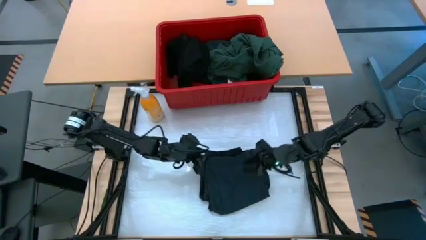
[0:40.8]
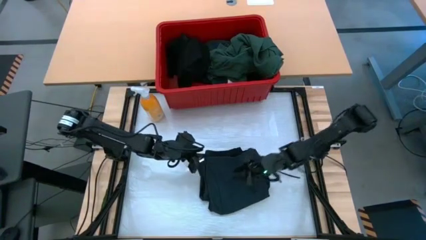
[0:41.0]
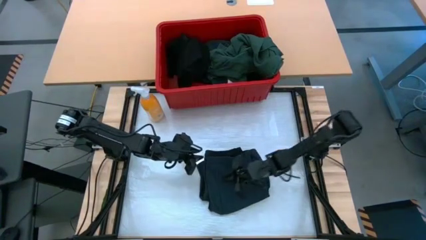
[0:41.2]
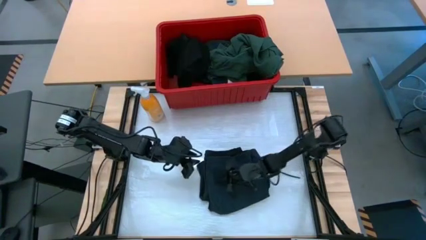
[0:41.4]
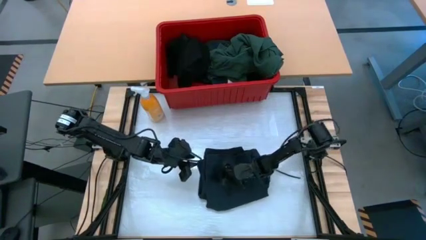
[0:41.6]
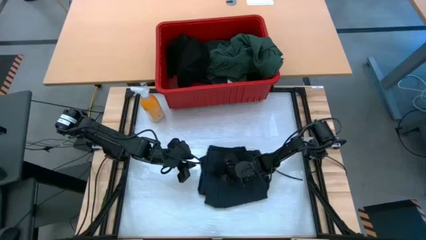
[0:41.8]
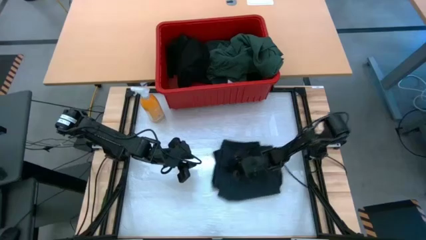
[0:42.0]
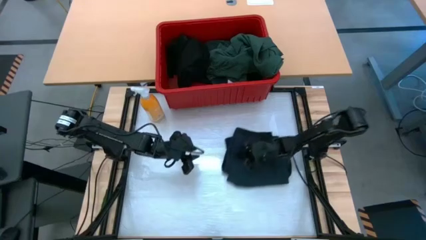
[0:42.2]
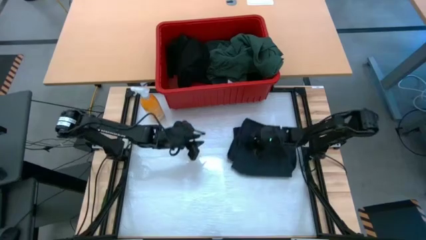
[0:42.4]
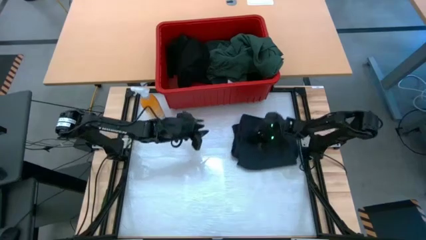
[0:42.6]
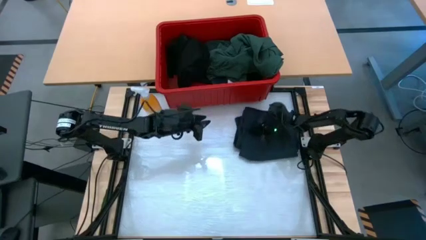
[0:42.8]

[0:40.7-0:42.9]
Task: Fold Laundry from Bin
Move the black shorts to the top right of the table

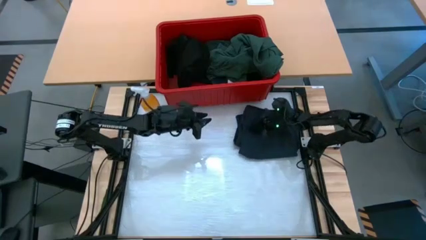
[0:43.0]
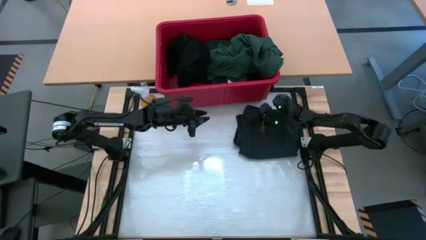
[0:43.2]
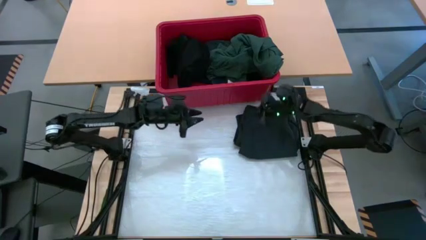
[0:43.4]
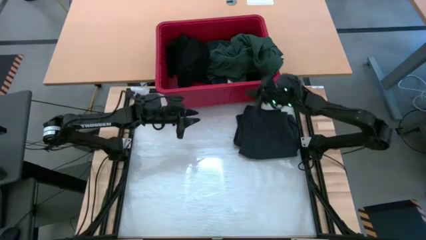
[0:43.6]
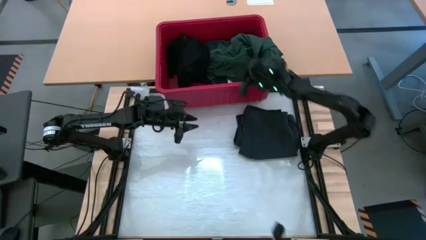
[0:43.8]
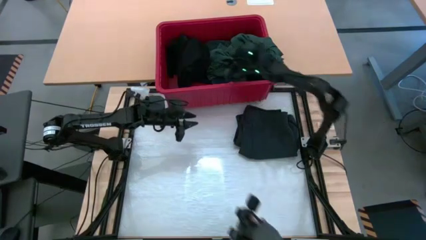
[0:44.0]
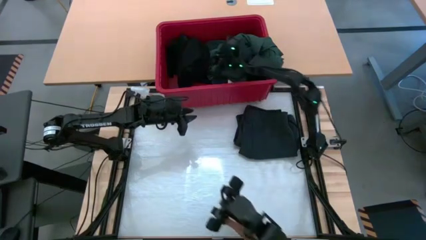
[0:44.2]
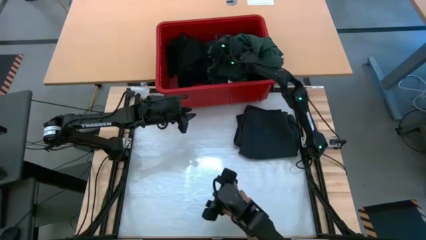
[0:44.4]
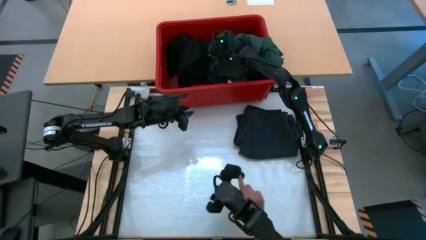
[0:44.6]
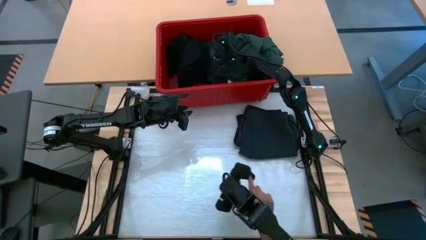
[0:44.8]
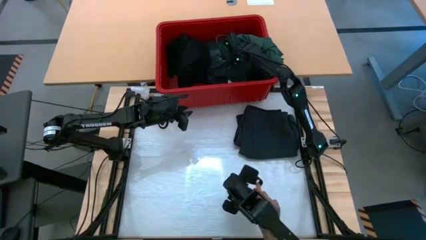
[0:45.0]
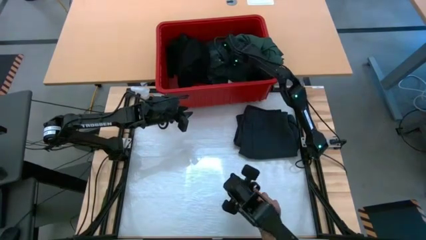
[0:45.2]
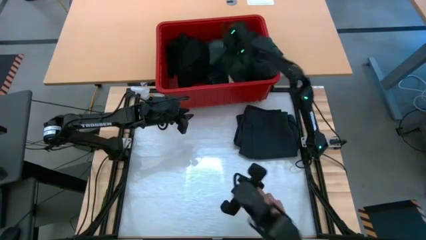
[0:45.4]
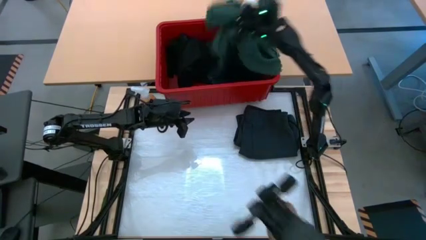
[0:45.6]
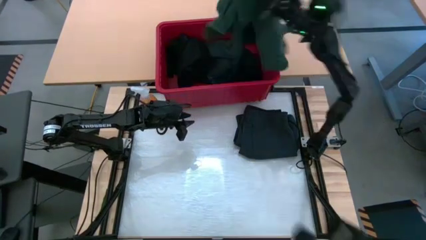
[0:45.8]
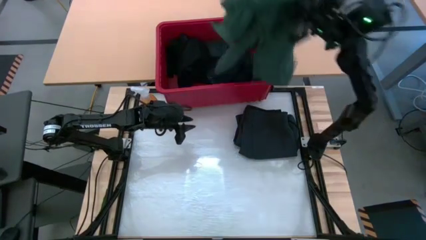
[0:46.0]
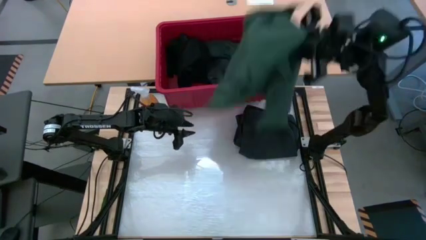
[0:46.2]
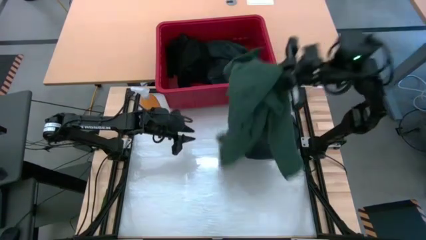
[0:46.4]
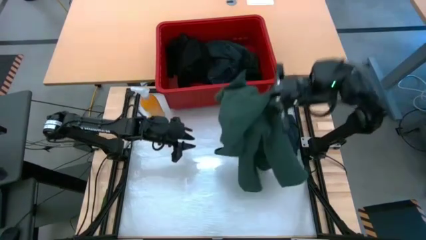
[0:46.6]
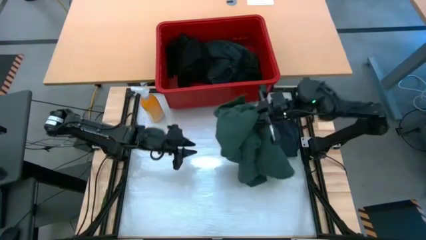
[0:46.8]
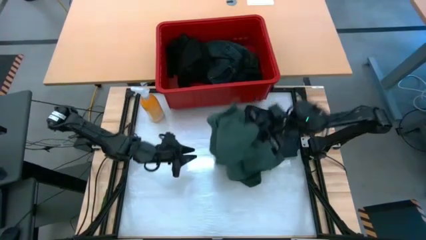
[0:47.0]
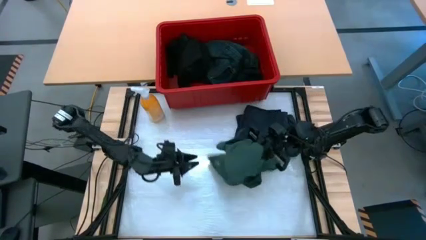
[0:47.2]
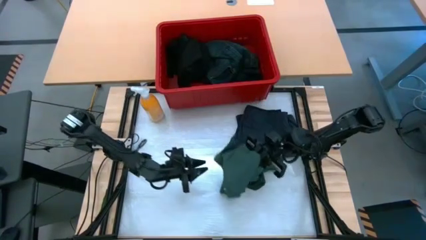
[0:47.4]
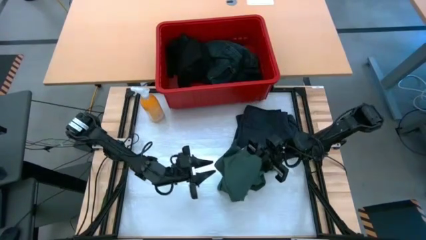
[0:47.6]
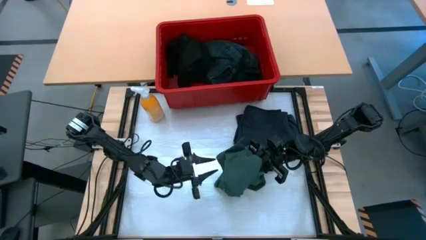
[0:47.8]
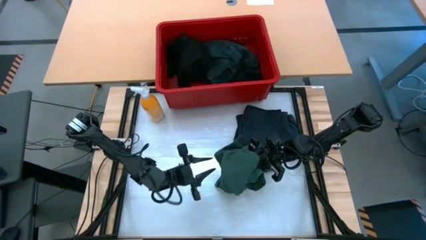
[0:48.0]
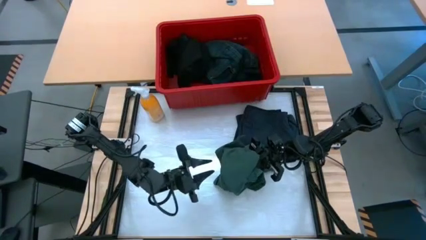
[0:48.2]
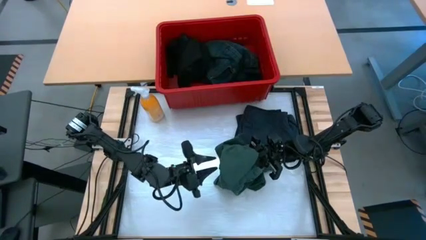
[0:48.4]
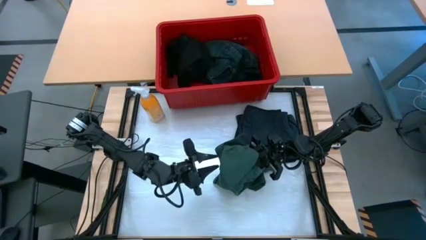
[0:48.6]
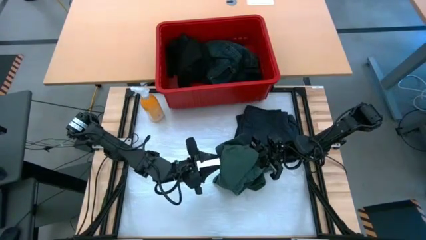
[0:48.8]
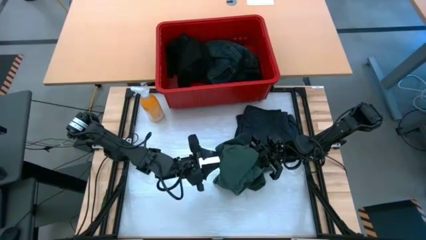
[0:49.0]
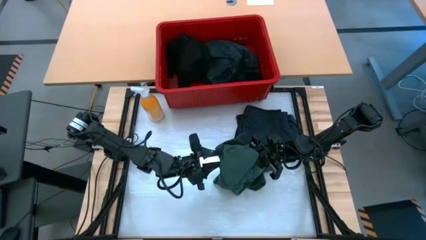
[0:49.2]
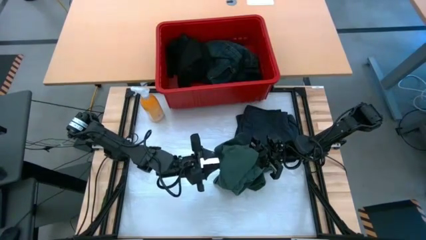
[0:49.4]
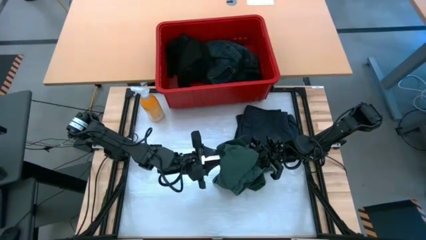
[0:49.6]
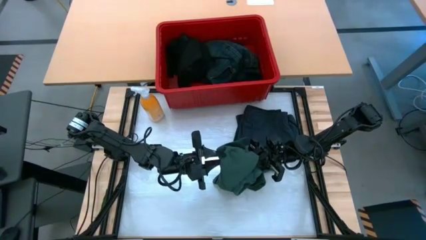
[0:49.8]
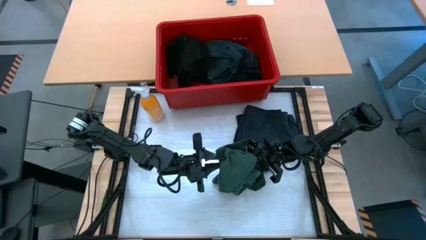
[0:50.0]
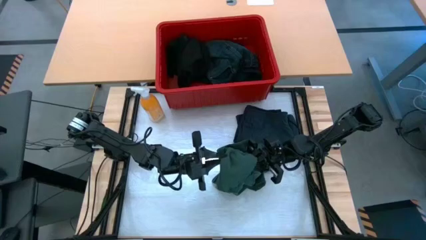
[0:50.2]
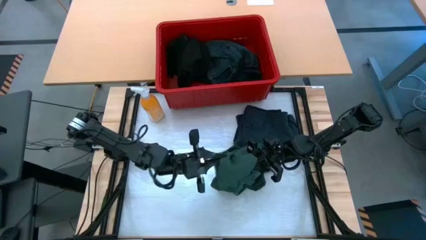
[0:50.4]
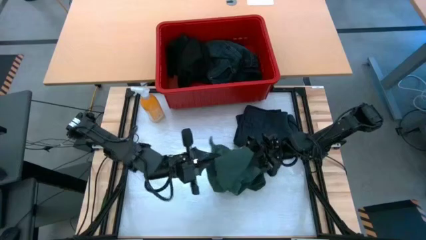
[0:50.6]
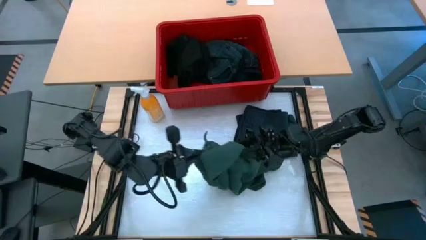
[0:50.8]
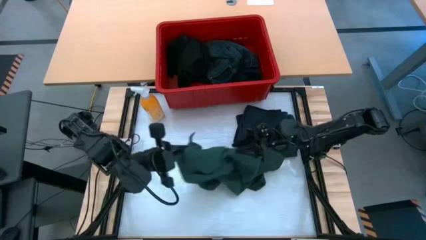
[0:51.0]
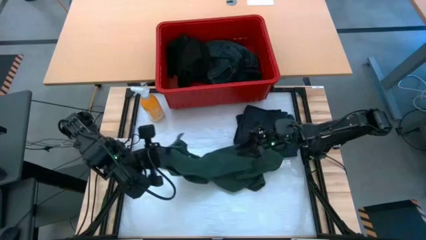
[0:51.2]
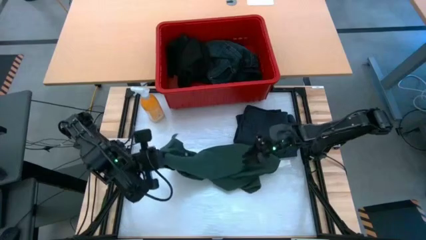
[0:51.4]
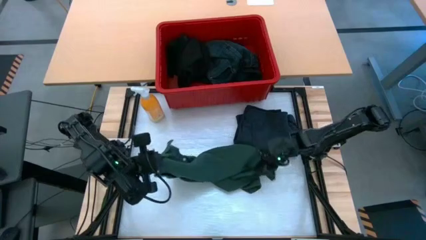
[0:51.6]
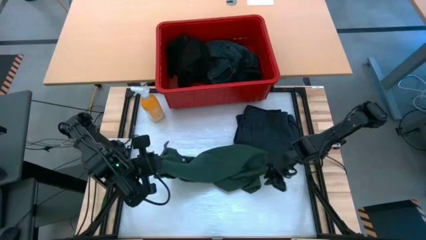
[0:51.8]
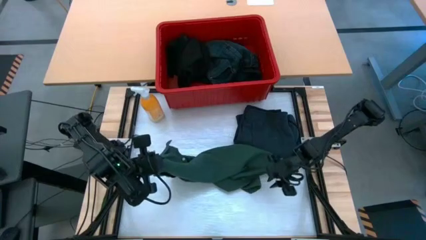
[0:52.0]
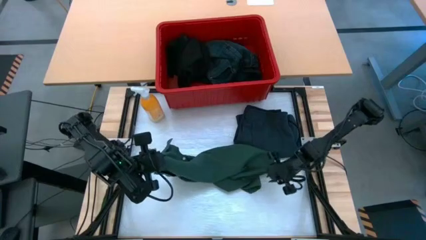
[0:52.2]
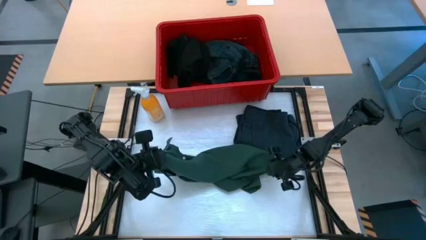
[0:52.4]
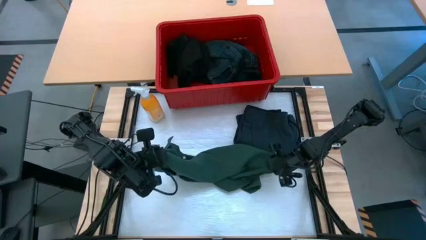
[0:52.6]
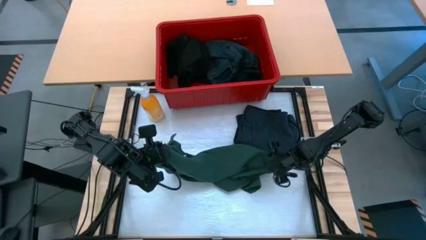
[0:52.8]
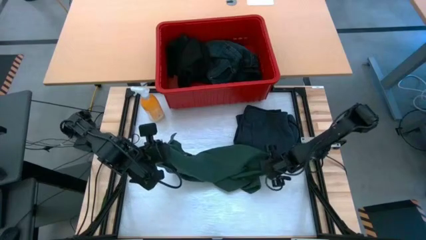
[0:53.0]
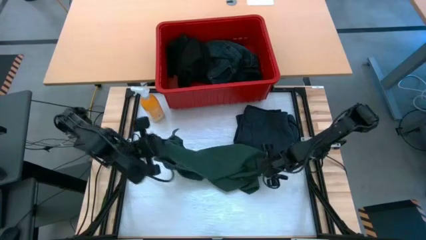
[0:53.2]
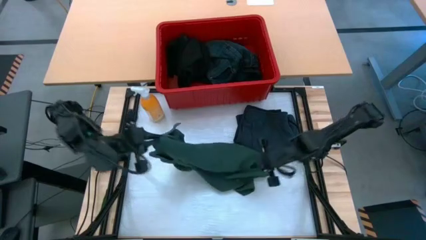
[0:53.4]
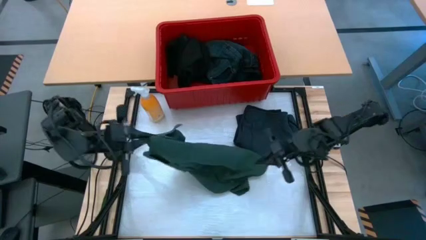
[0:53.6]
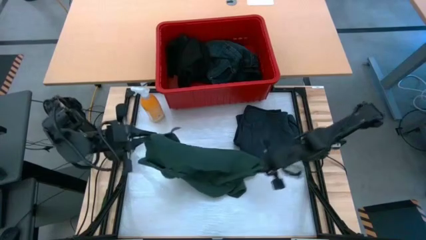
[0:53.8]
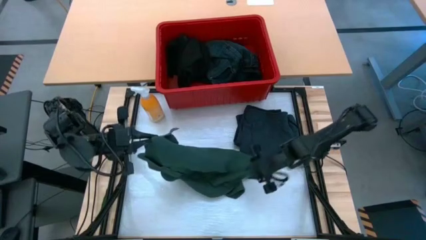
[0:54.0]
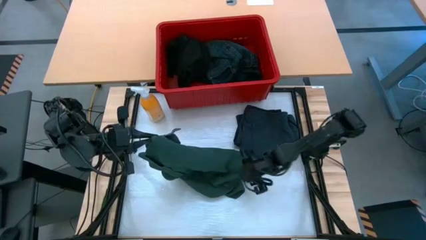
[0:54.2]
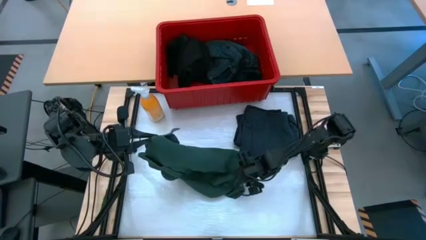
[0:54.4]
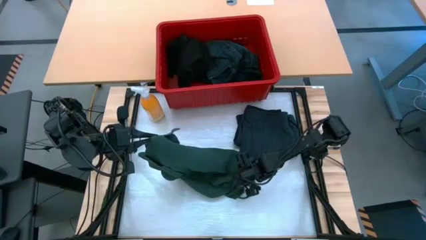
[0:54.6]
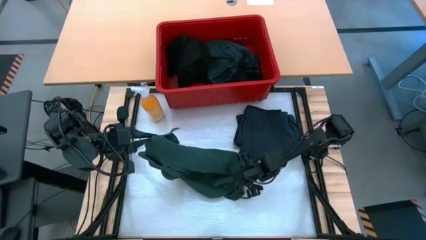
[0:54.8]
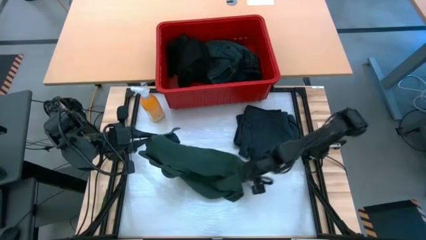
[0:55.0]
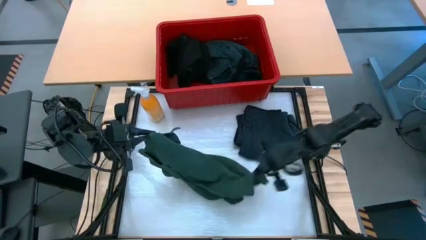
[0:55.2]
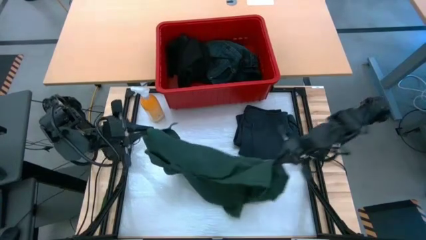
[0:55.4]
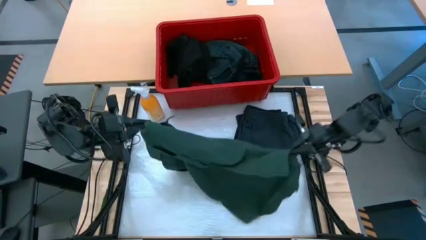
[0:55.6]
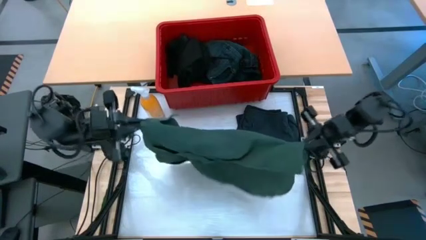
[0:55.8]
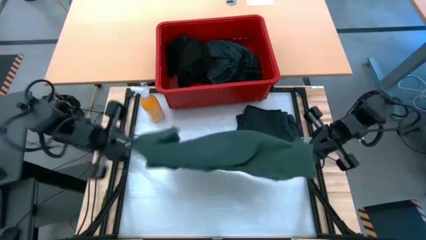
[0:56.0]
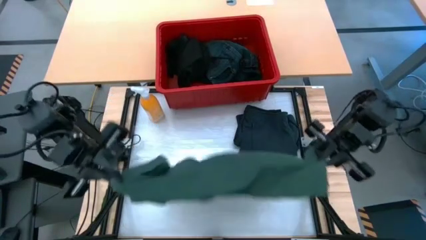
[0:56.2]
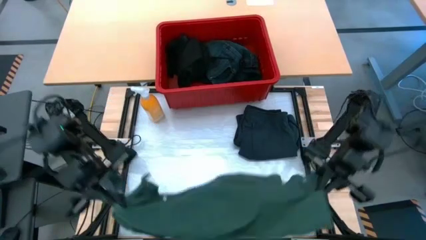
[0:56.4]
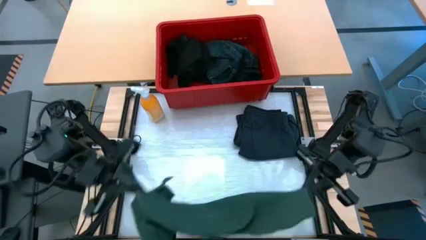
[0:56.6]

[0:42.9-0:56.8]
Fold the green polo shirt from the bin
